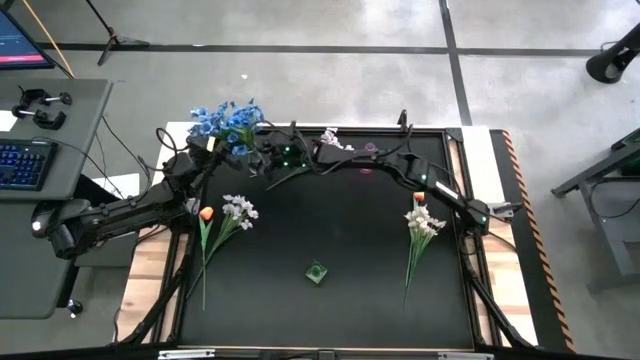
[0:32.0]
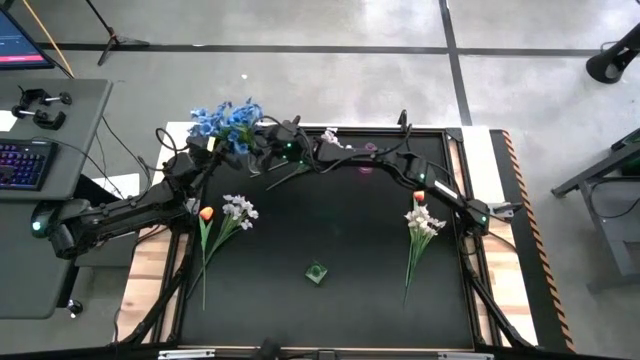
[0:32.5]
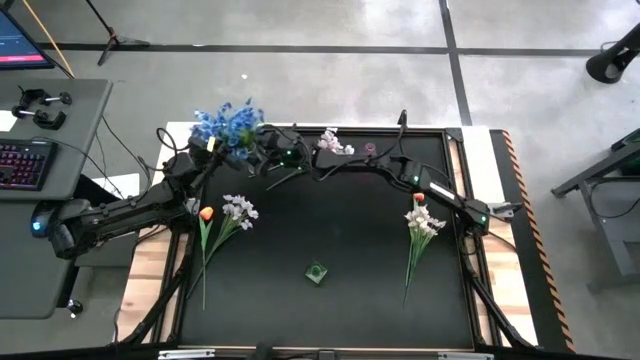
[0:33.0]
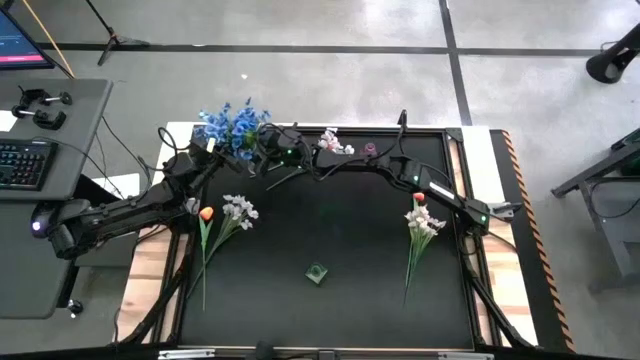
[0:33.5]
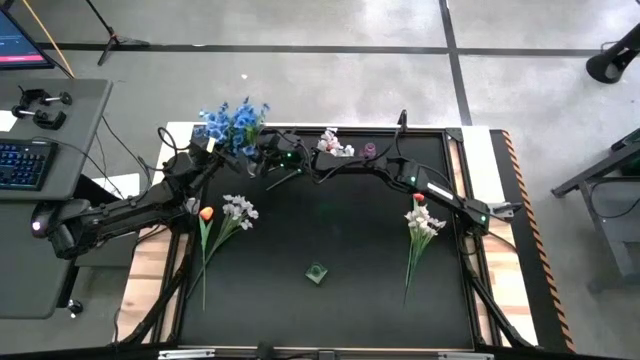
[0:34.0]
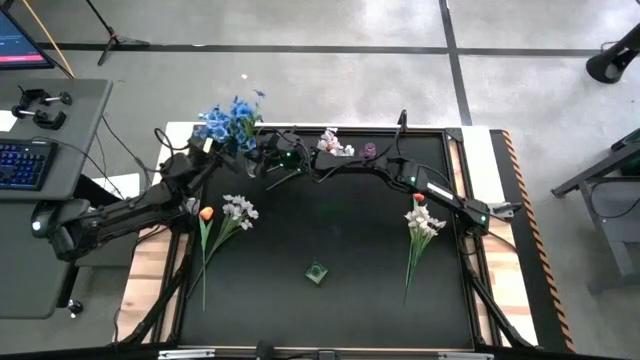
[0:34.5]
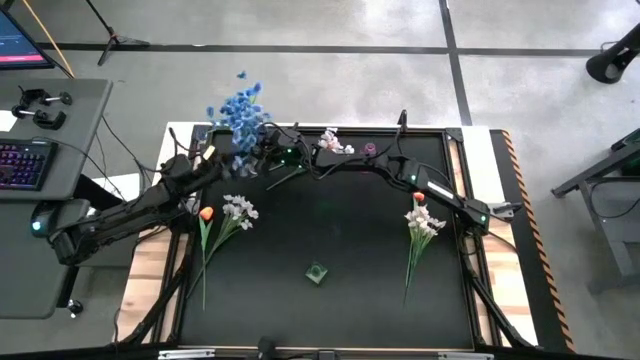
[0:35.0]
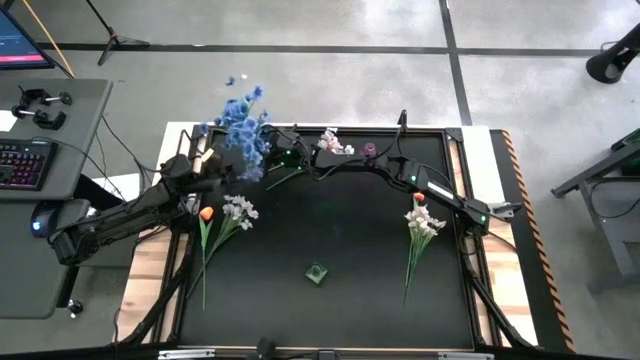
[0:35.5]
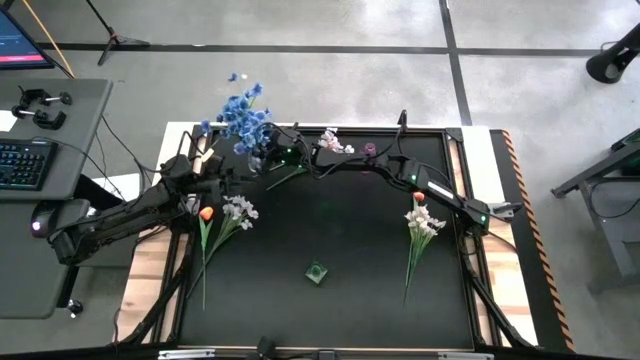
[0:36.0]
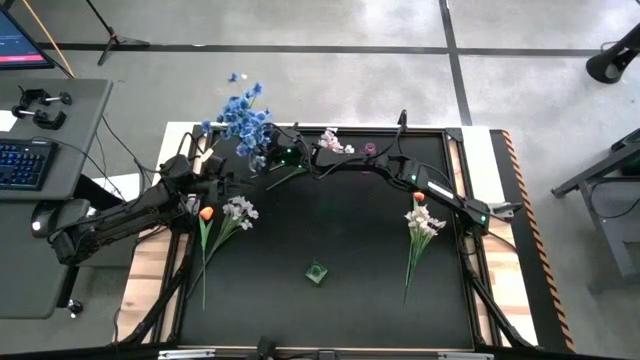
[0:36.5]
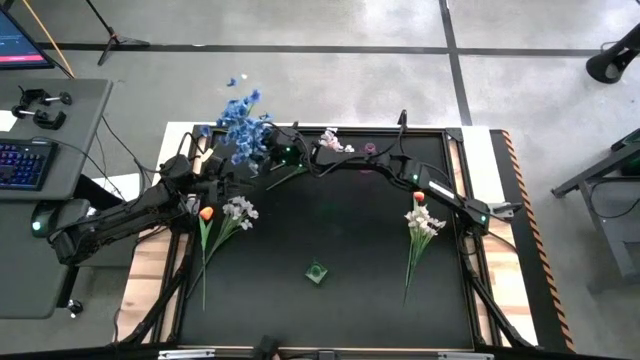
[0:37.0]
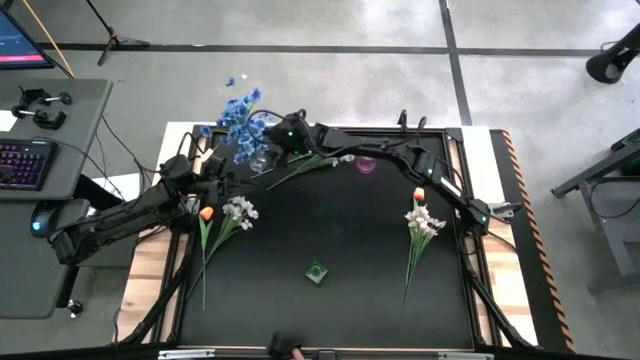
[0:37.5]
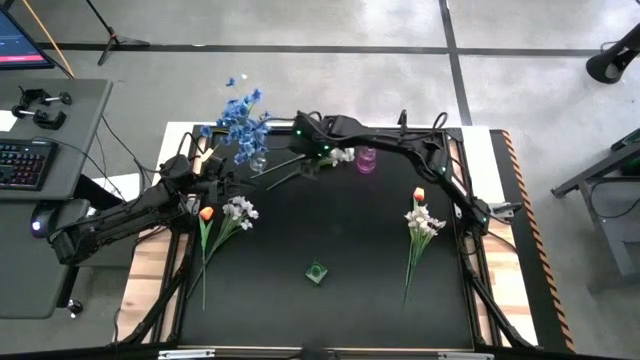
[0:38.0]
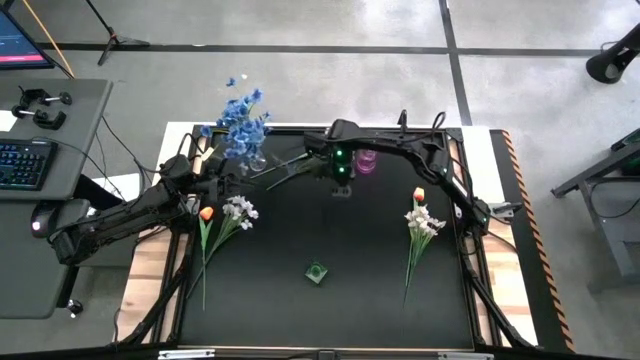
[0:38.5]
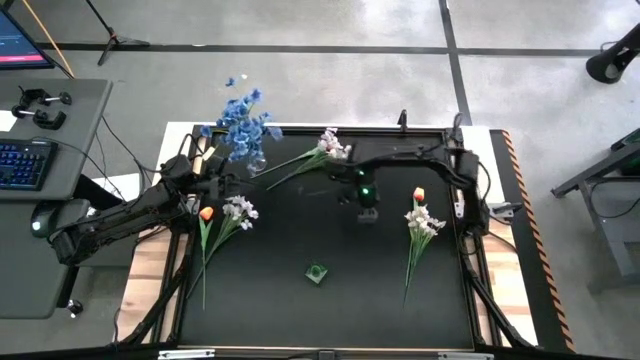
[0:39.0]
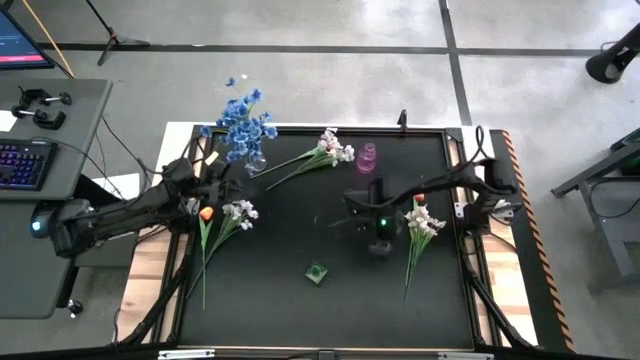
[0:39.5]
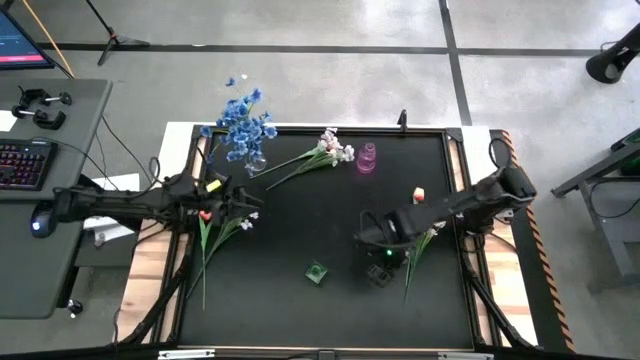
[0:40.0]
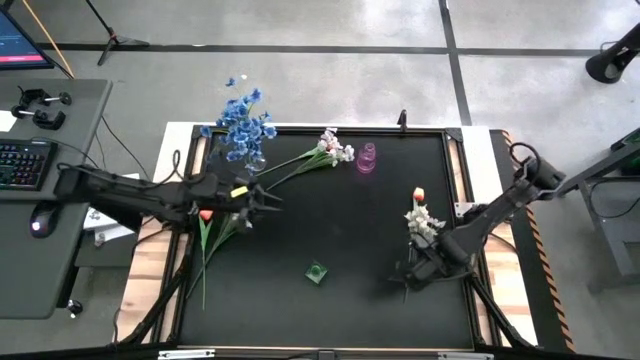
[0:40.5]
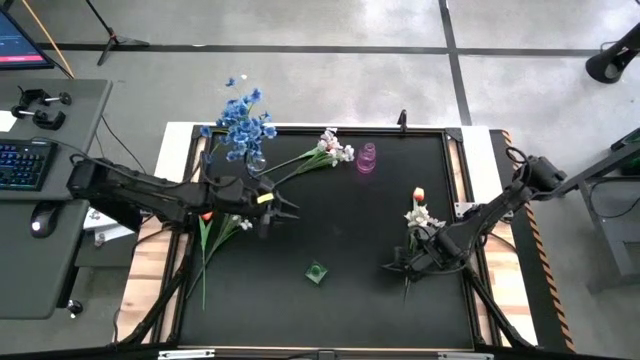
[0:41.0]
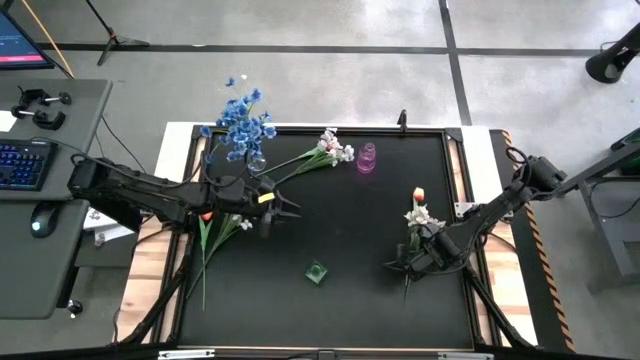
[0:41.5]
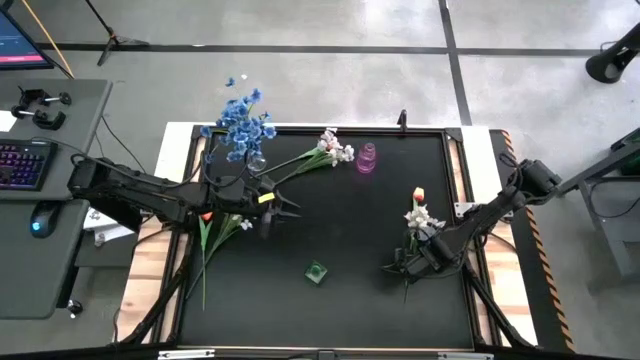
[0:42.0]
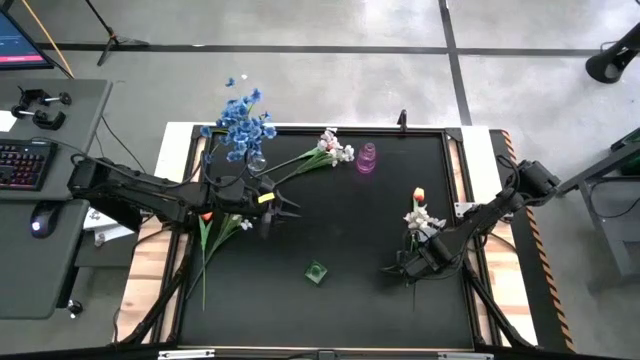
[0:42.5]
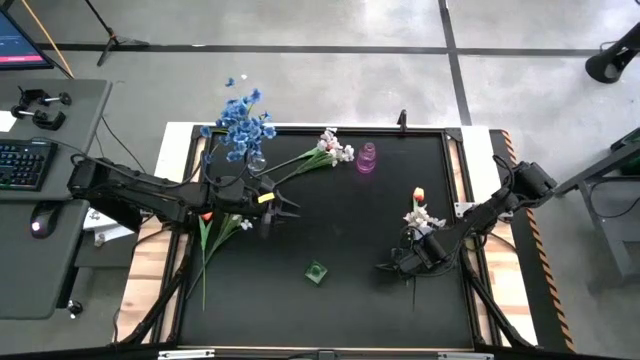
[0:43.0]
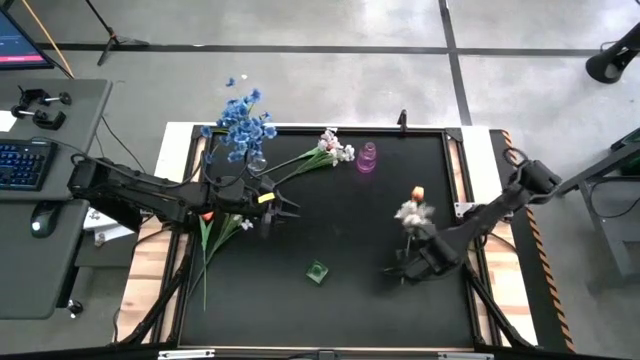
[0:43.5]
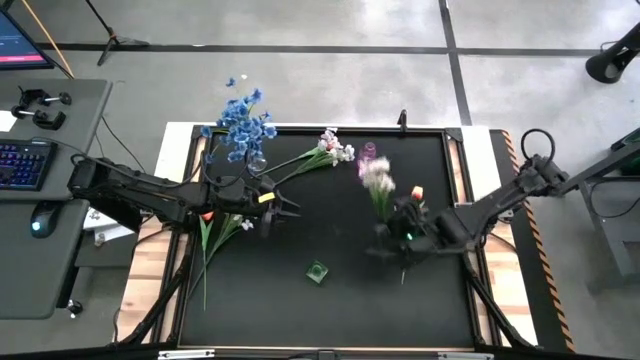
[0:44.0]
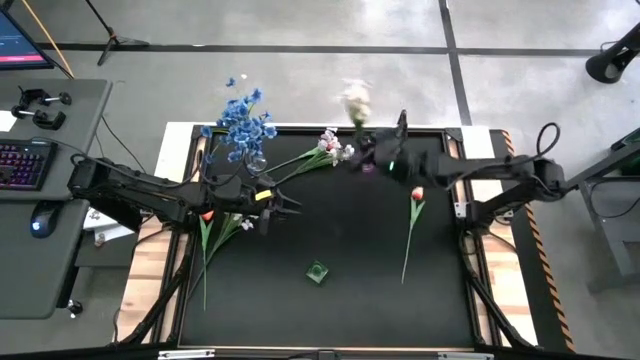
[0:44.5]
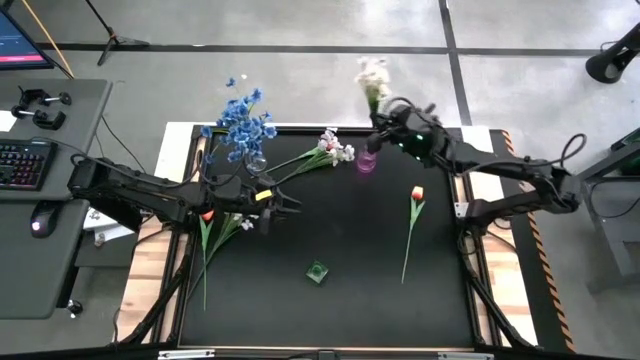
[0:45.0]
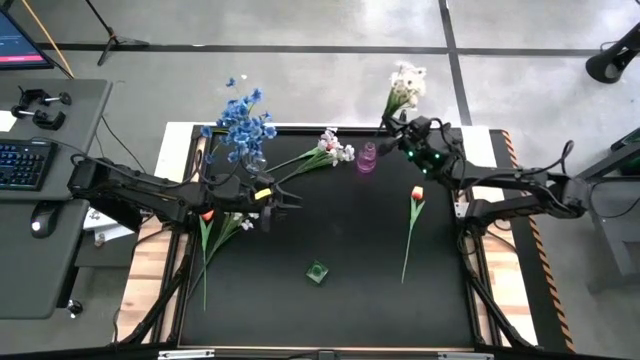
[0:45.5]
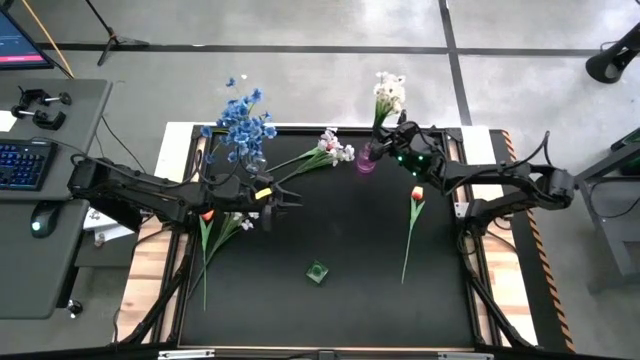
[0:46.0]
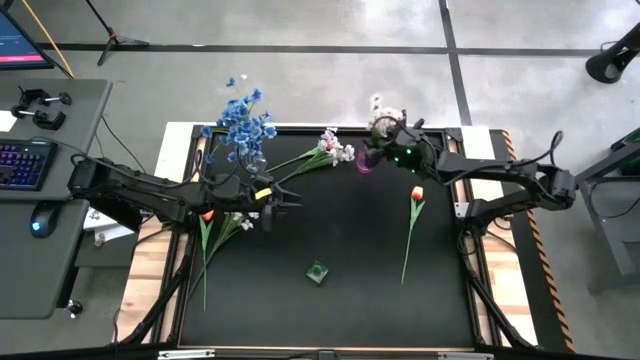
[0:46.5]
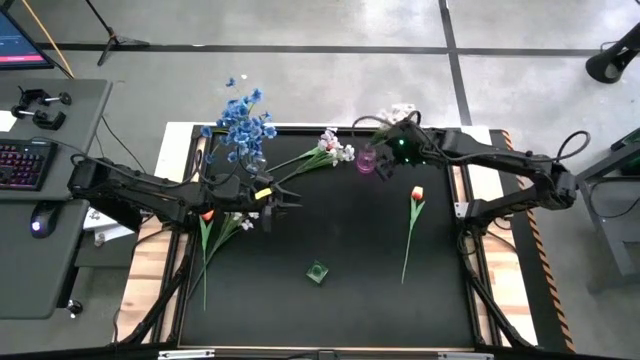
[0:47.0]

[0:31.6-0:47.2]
Task: Sort flowers into vase by color
Put the blue flowers into the transparent vase

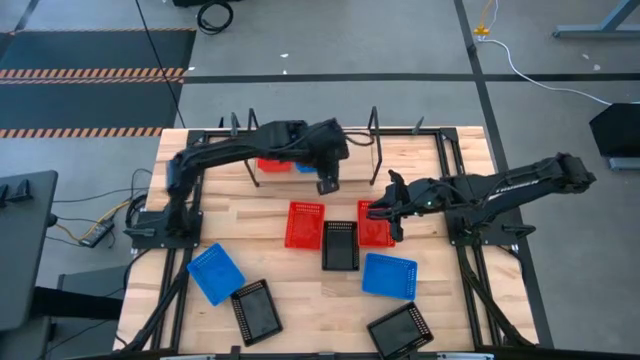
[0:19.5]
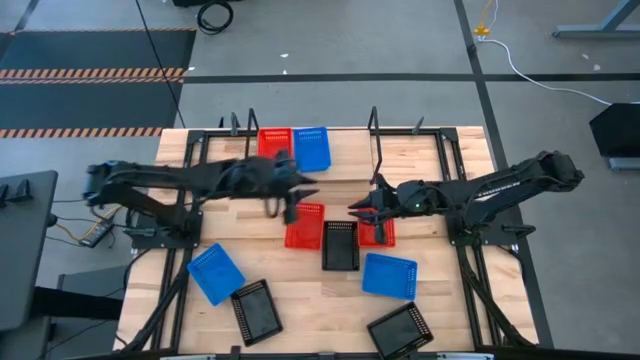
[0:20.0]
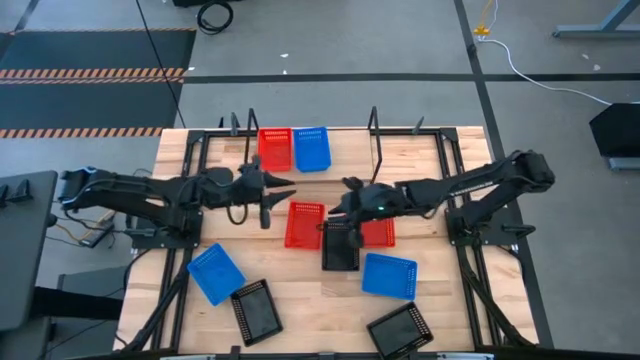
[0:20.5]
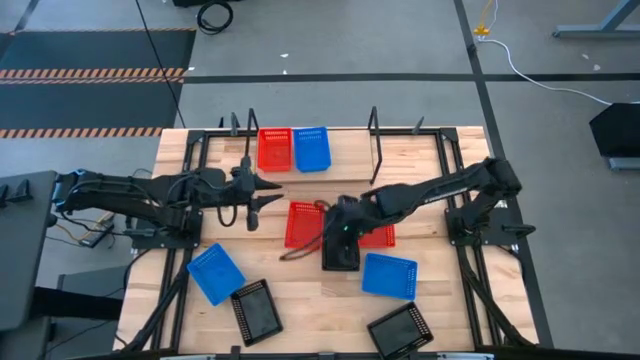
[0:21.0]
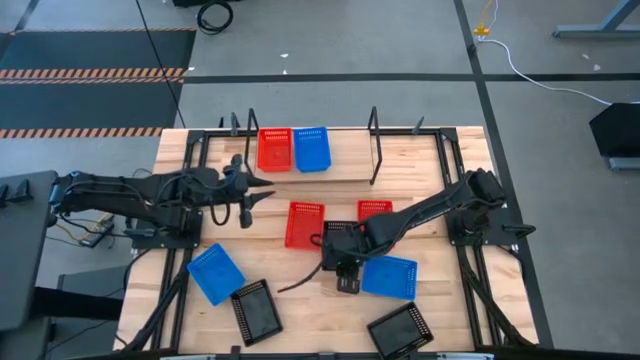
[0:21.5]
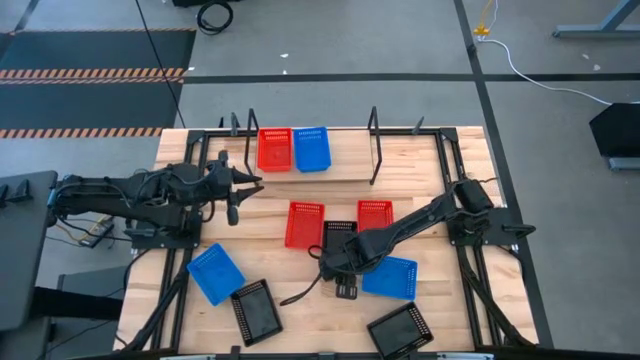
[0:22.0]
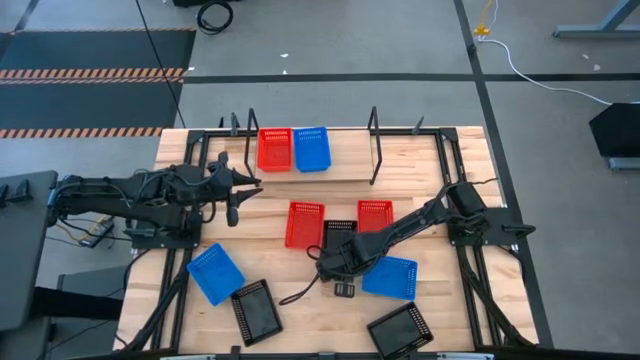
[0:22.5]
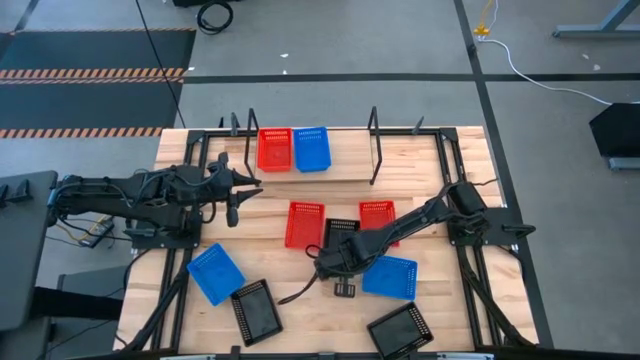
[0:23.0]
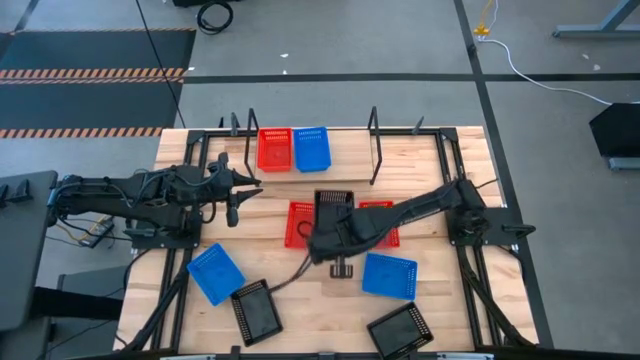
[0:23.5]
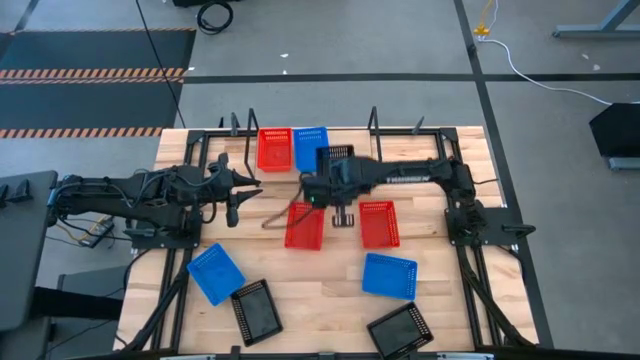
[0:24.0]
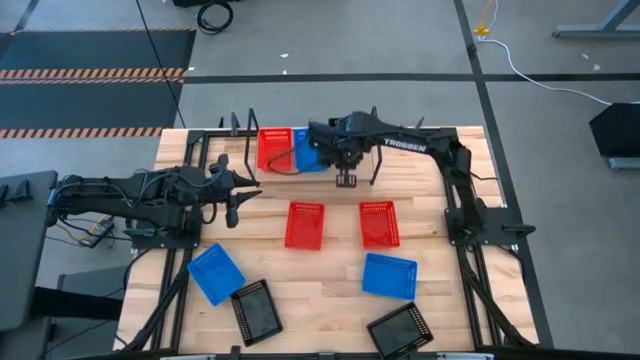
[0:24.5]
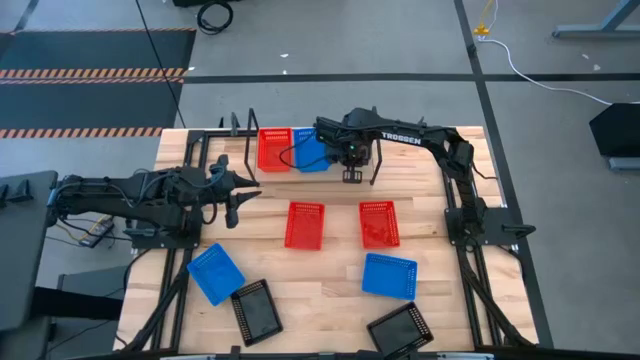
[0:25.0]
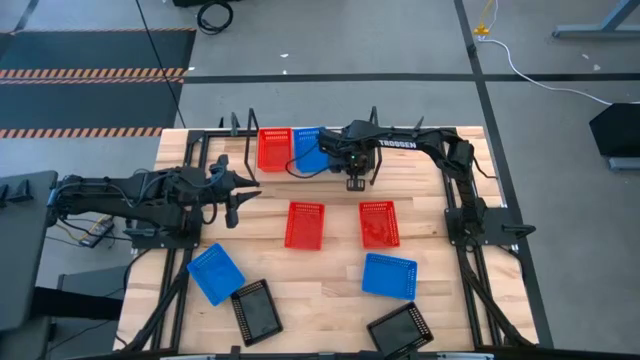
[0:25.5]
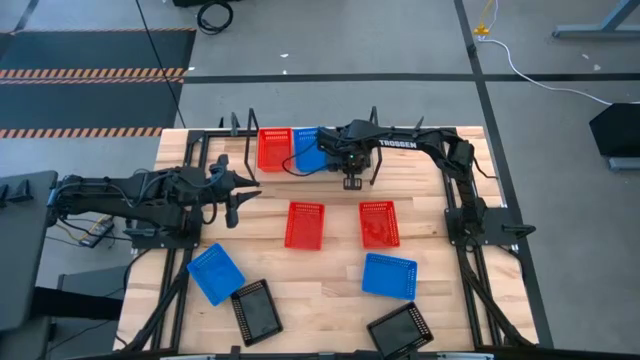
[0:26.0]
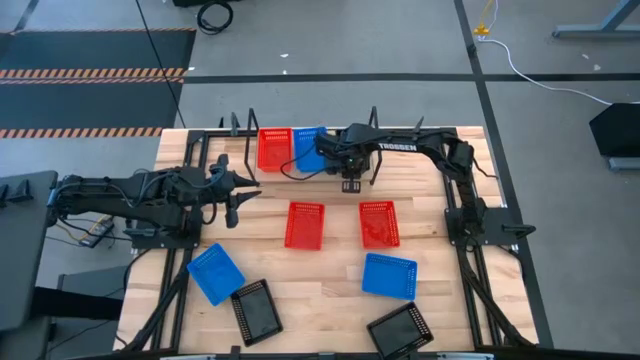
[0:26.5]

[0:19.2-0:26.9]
Task: Stack baskets on shelf by color
Put the top black bin on the shelf
